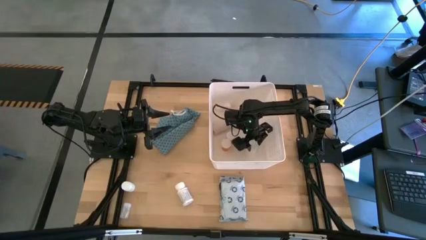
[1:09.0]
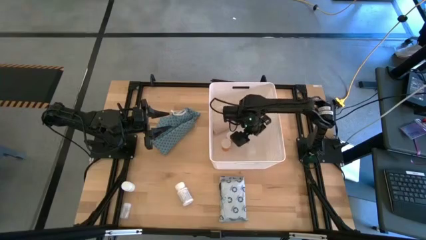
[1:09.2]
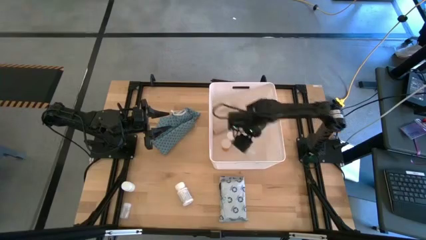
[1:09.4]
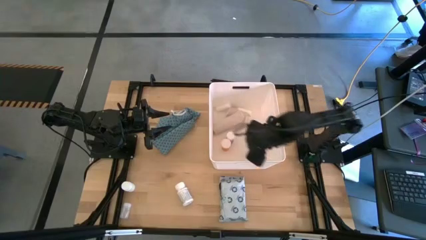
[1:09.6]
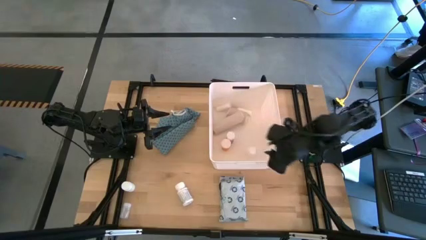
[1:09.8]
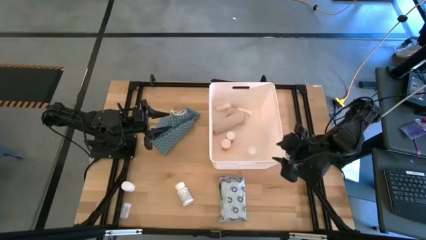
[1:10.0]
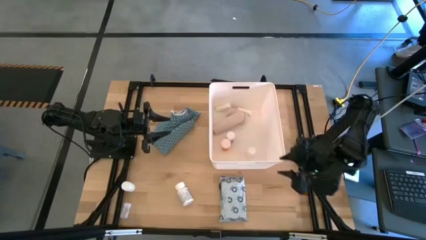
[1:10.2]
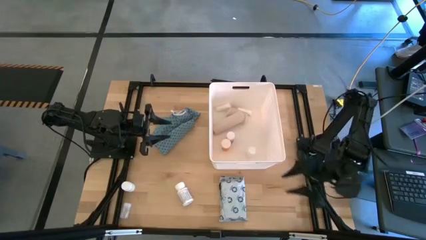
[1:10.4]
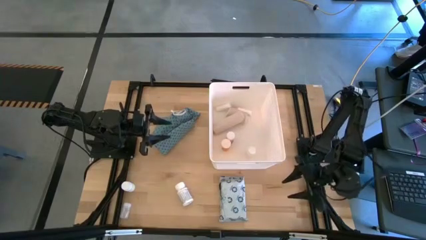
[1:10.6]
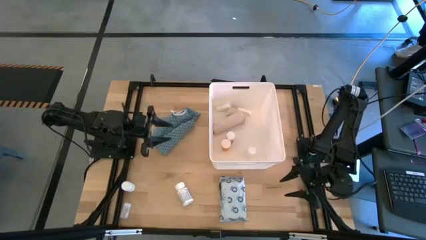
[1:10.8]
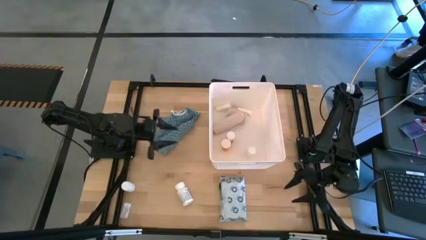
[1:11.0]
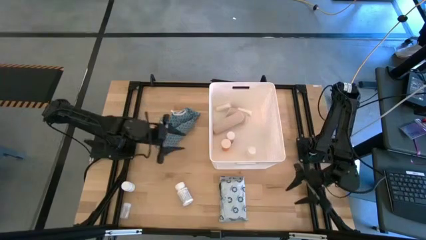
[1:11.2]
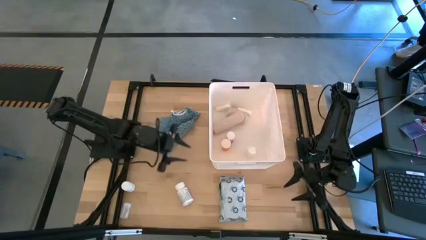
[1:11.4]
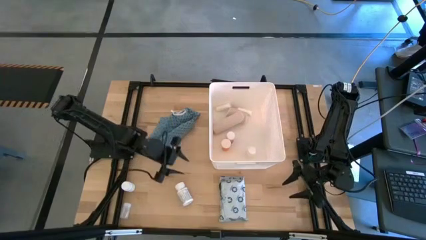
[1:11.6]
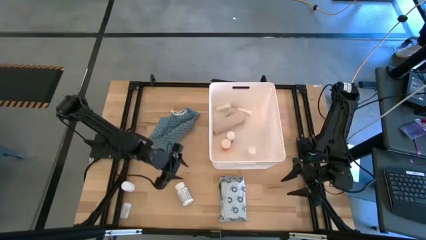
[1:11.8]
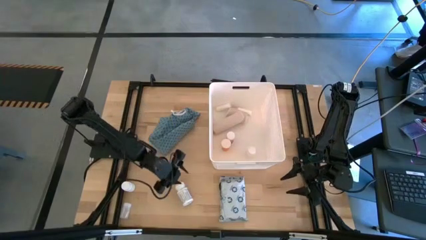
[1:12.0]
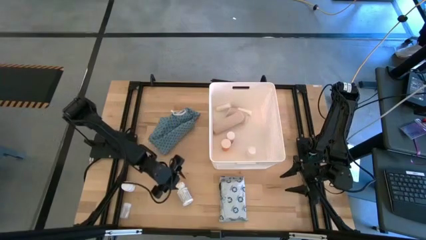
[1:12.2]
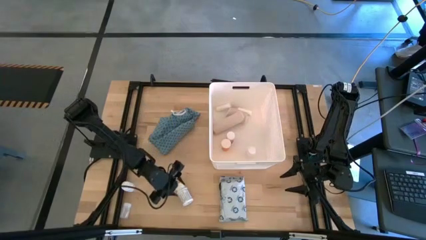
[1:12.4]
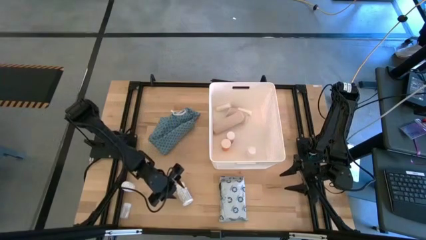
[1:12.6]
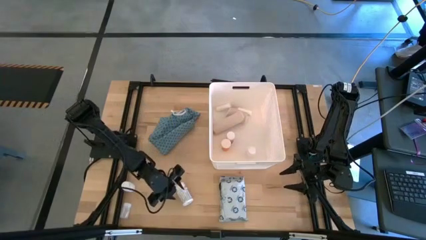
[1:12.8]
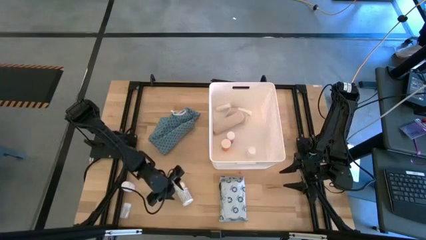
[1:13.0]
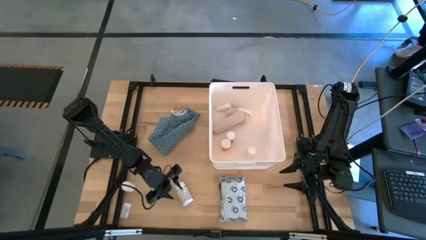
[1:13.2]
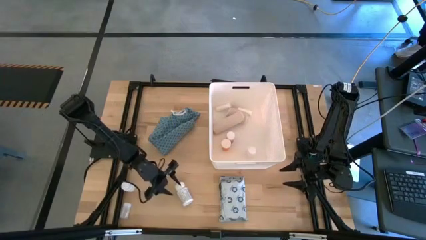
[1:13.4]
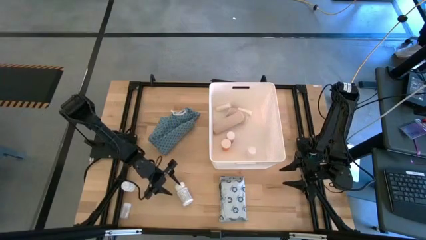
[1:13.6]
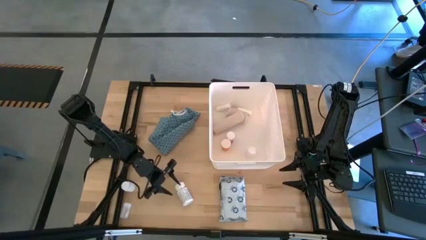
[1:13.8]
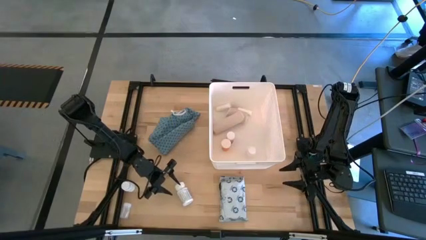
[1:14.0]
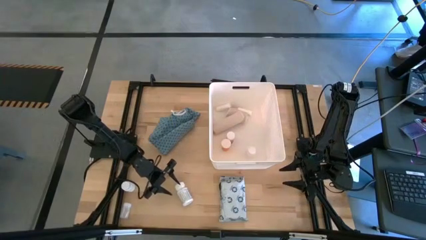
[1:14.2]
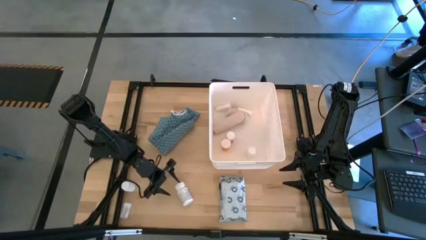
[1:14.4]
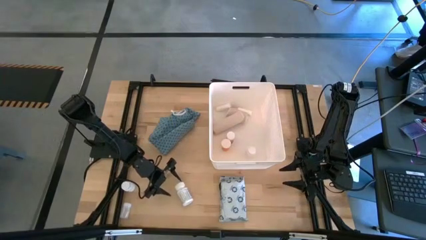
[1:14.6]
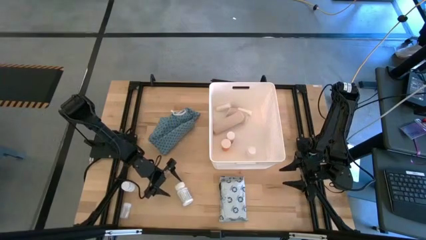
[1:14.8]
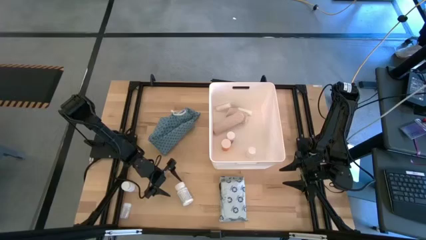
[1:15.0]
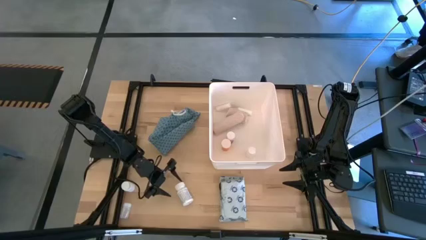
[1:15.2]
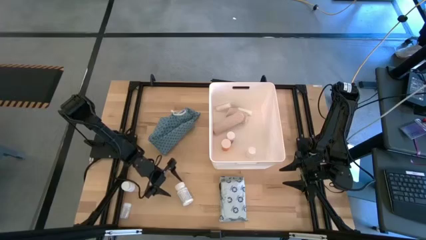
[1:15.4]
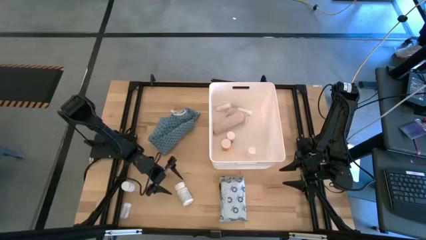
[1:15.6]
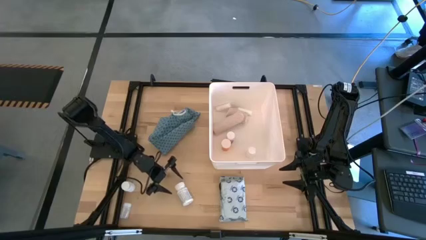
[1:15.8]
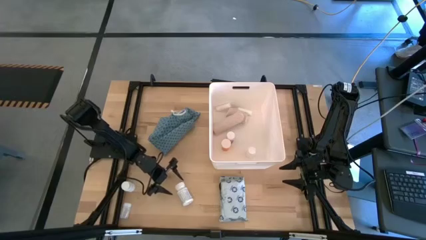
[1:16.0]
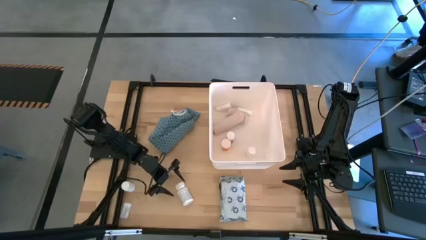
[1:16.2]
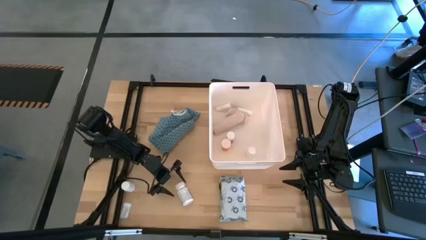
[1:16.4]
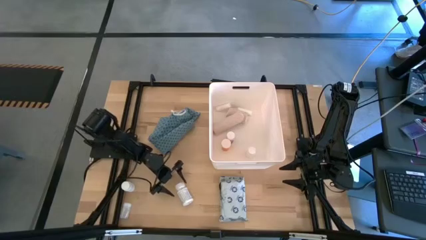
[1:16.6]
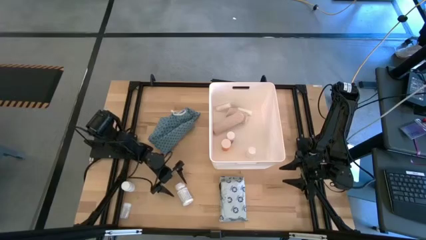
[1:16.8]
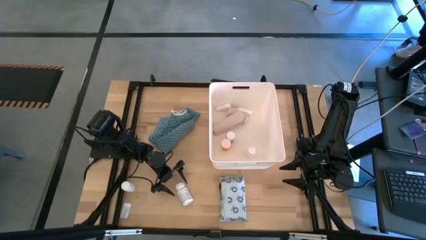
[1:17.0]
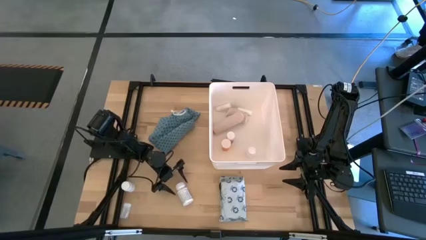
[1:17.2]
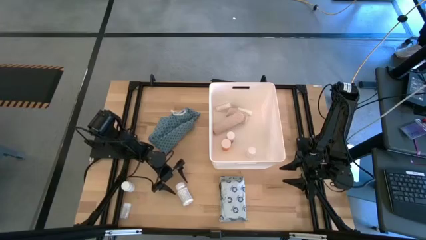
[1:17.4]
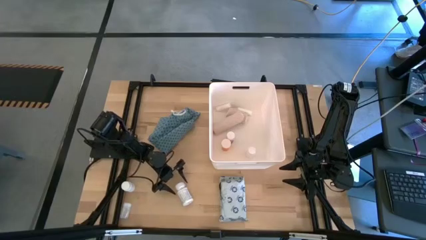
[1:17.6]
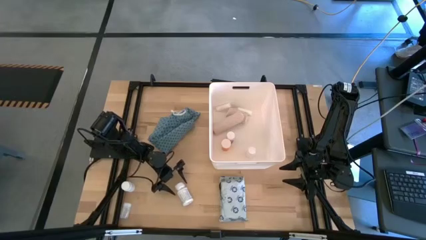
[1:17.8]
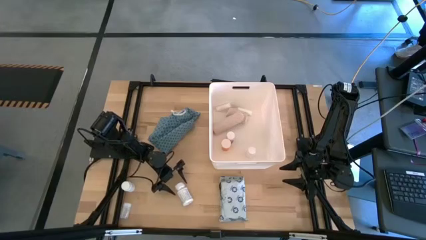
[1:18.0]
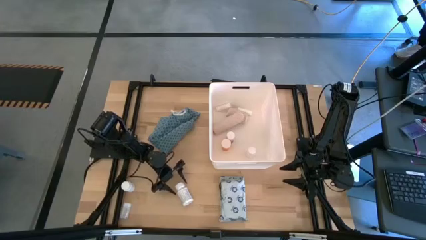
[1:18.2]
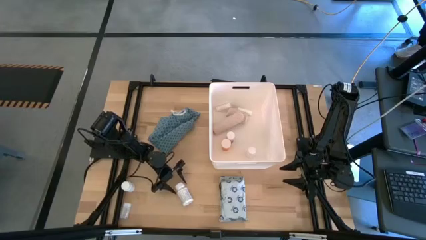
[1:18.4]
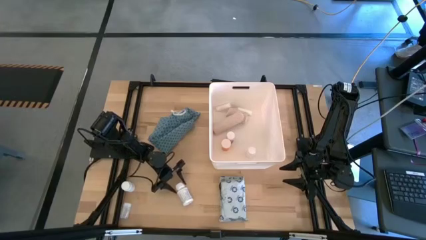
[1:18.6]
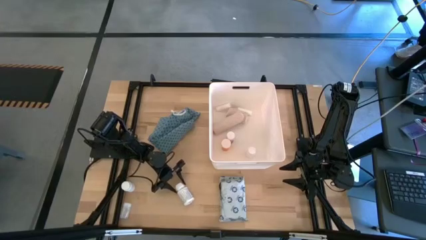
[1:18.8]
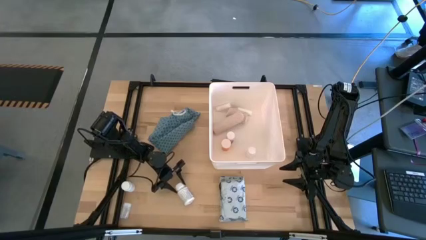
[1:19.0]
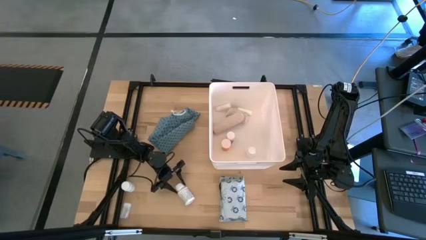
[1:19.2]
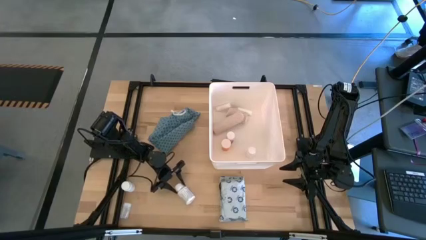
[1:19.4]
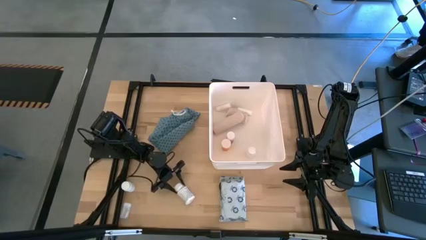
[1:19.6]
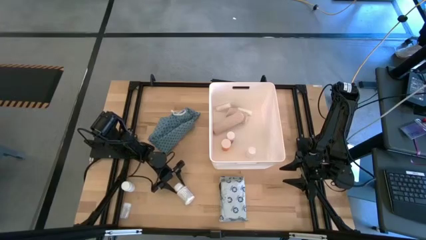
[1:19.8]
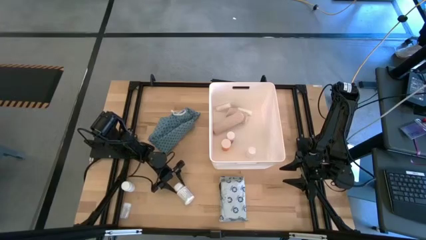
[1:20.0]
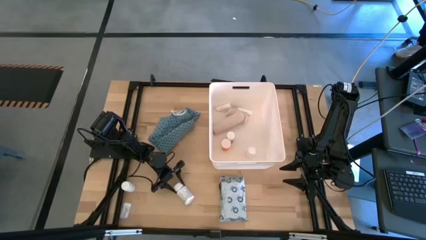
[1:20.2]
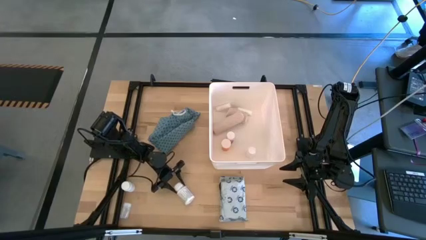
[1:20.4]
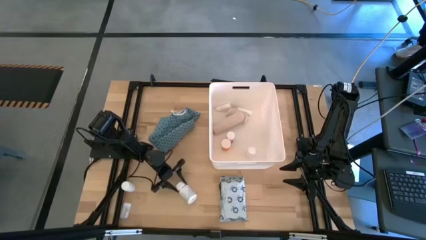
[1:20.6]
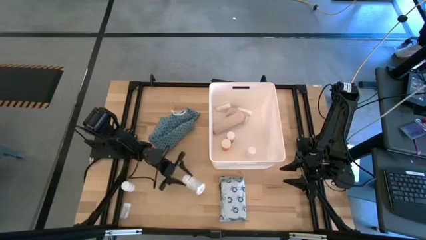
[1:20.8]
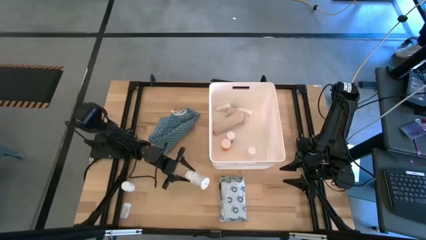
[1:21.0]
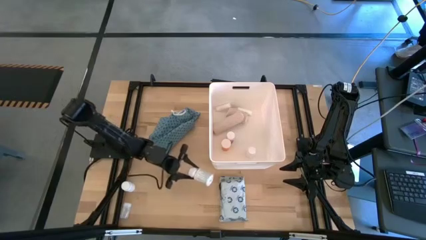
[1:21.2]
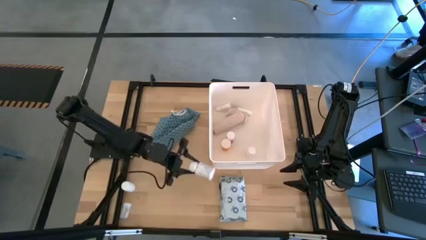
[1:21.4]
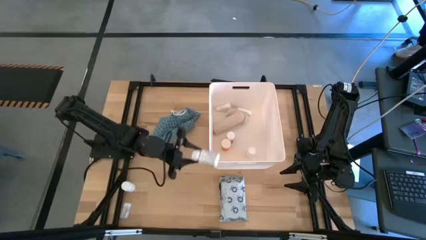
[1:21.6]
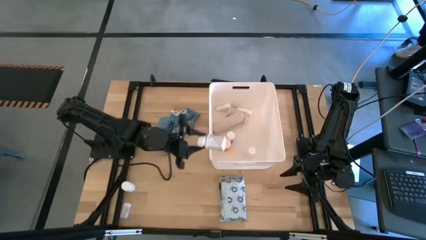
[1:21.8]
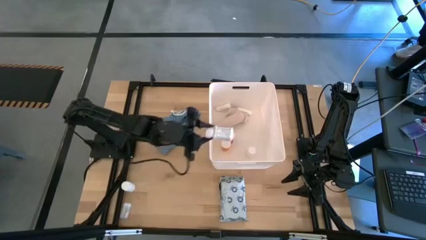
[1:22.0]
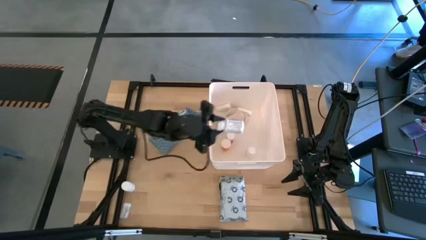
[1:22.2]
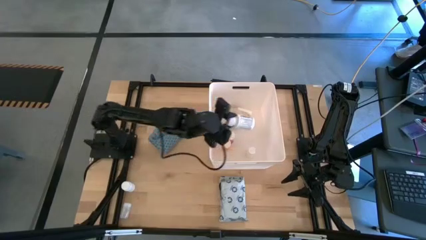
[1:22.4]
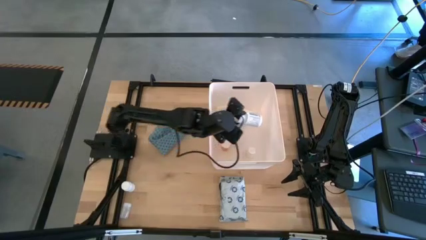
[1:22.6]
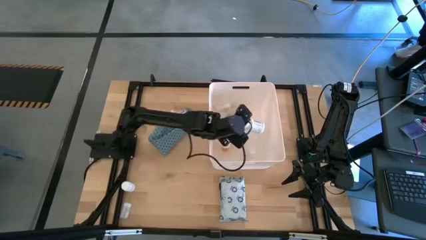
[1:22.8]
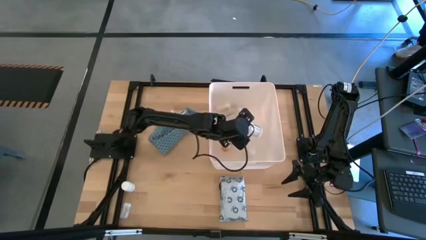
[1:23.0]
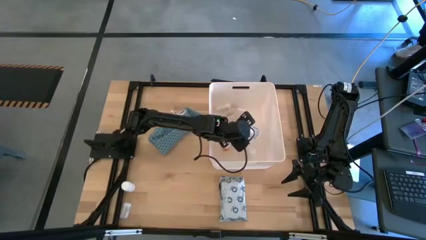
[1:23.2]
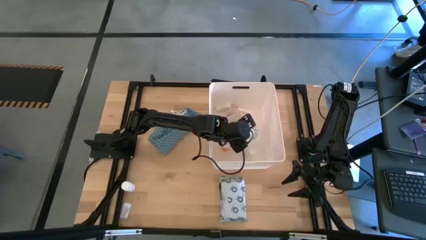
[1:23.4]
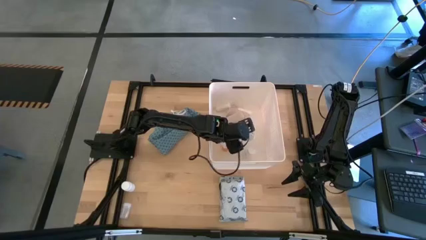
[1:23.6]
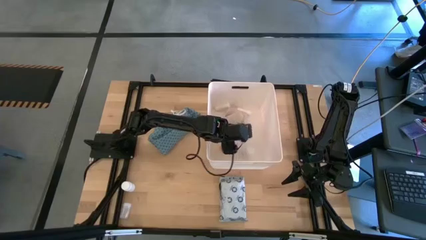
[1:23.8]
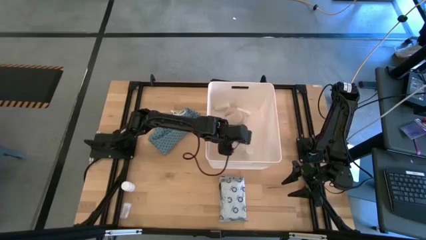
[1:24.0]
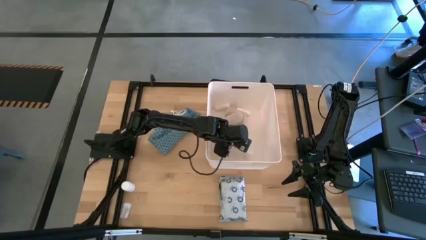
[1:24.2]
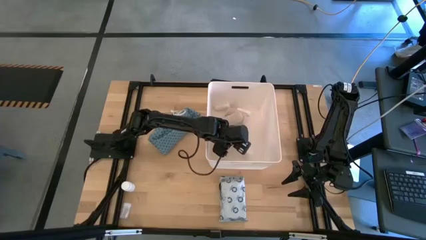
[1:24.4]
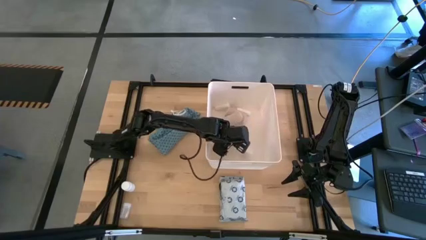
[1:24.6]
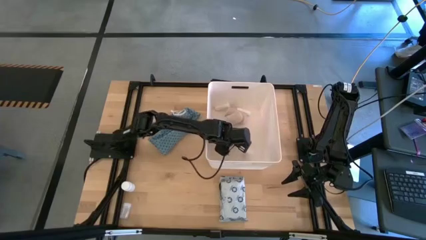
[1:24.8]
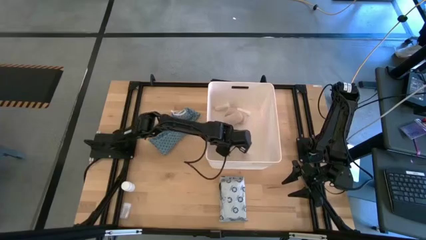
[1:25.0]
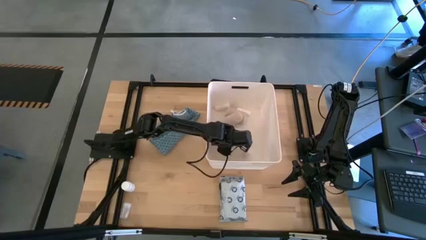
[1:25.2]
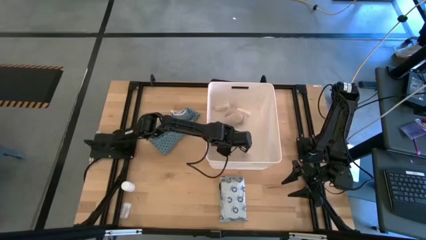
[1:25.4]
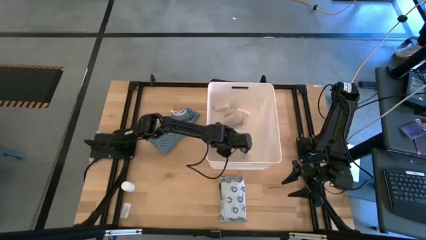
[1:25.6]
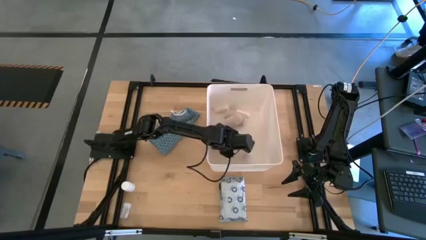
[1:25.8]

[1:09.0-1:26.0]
Task: Pick & place medical supplies in basket/bin
Put the white and green medicine bottle into the white bin
